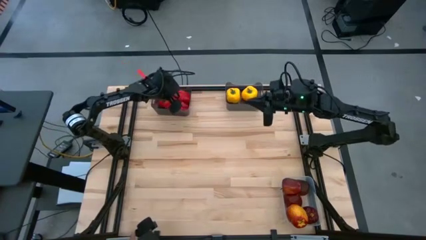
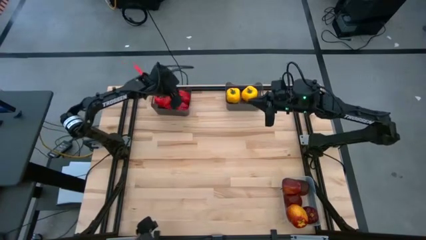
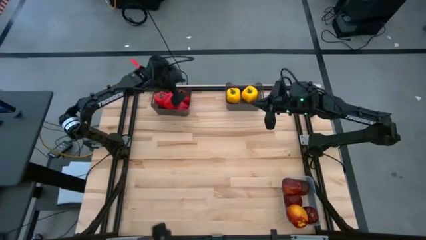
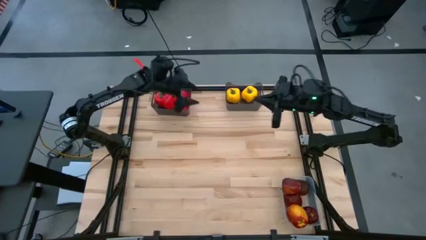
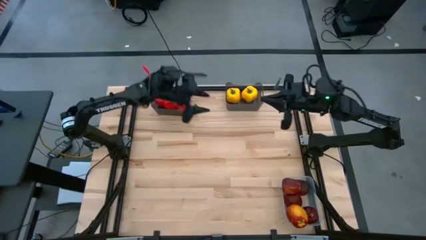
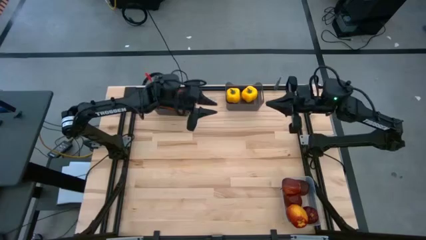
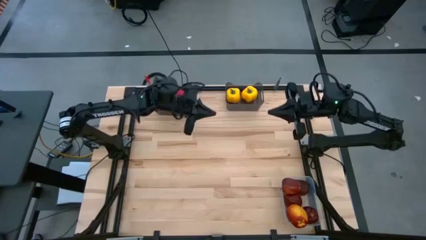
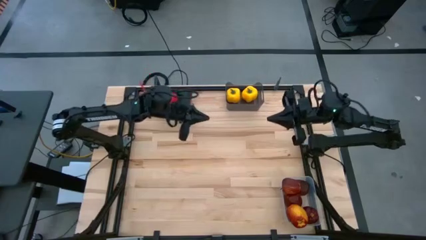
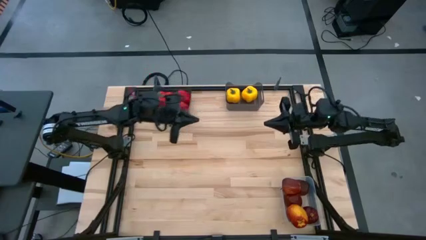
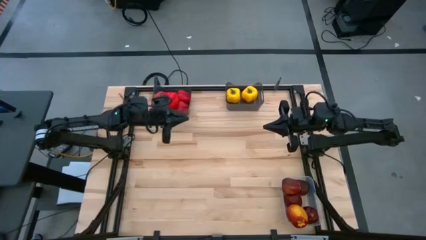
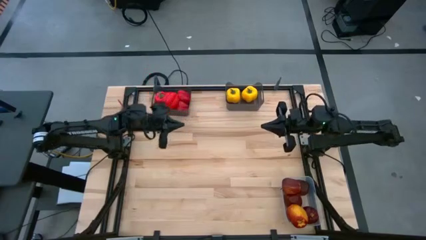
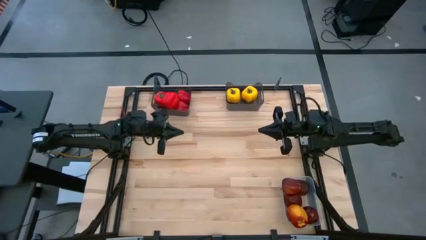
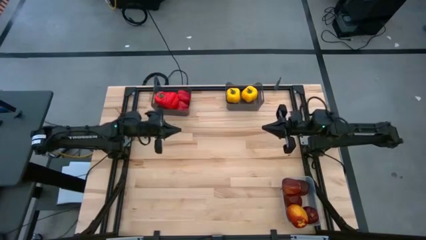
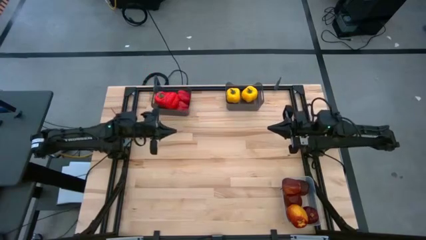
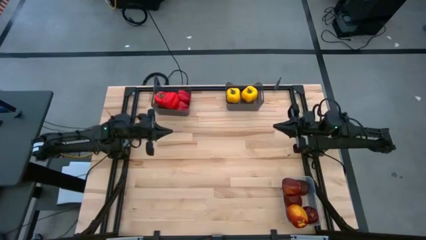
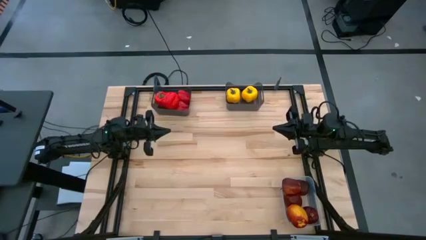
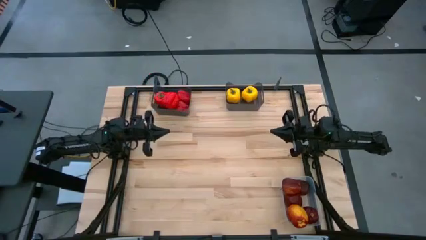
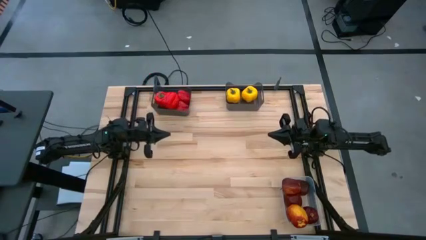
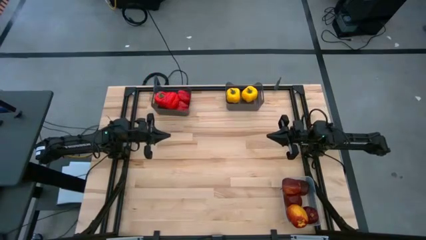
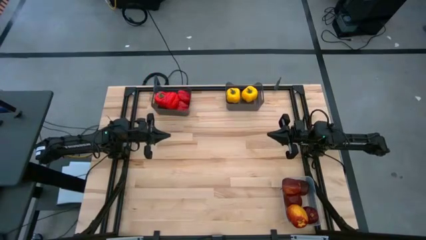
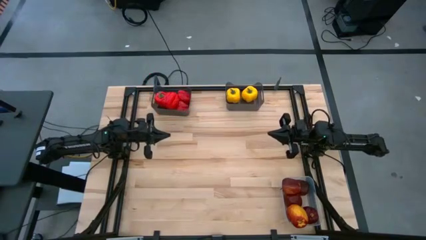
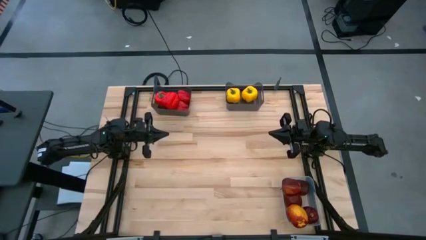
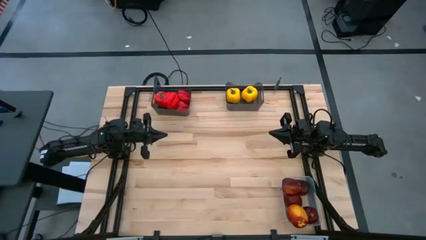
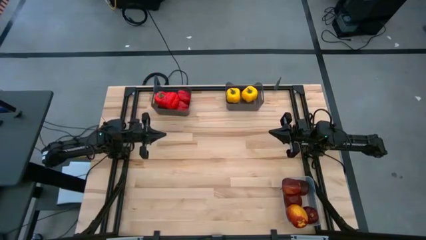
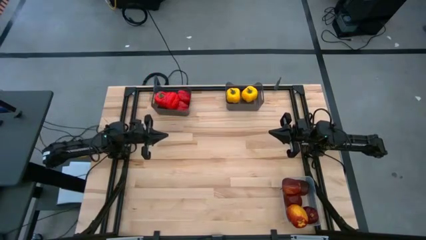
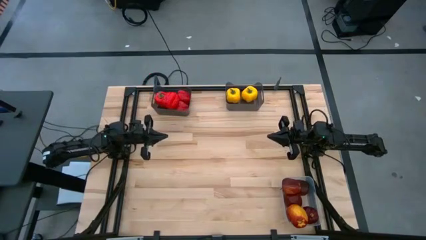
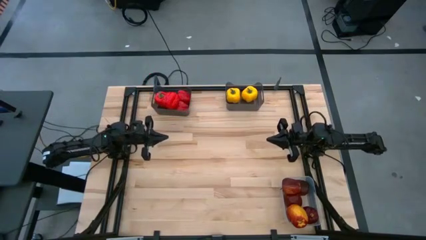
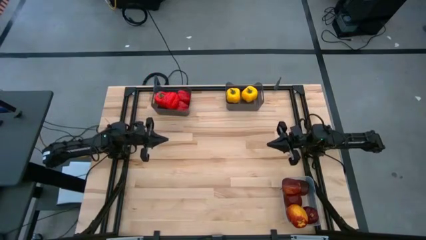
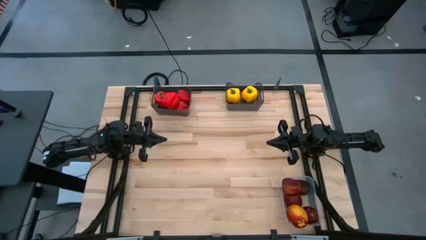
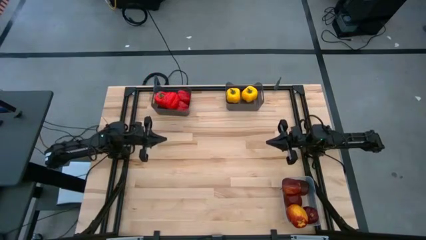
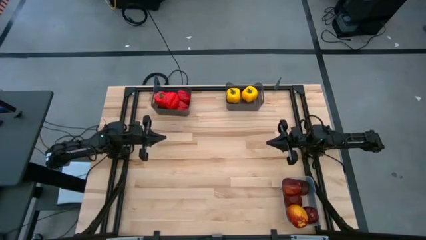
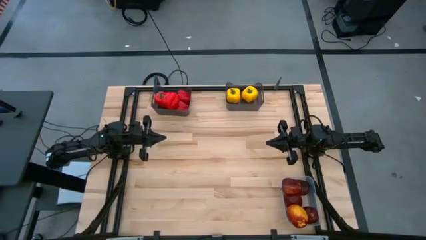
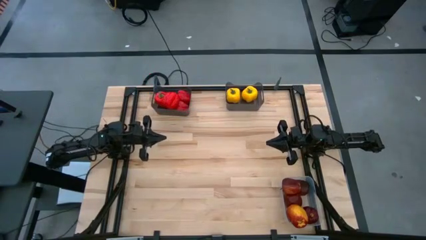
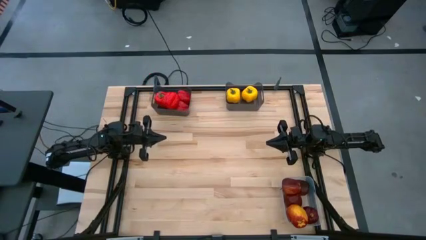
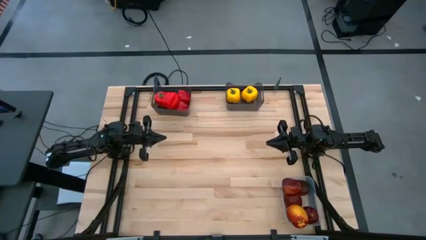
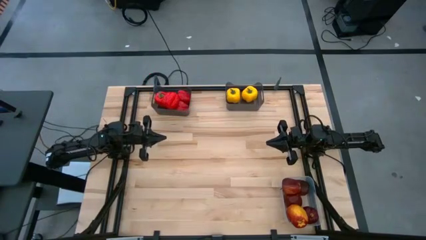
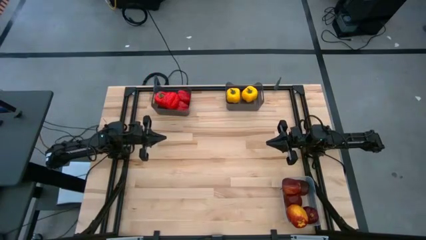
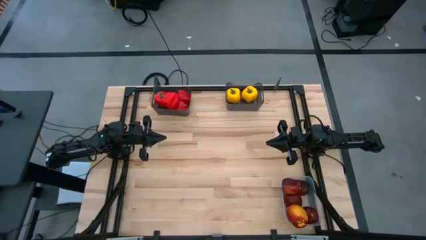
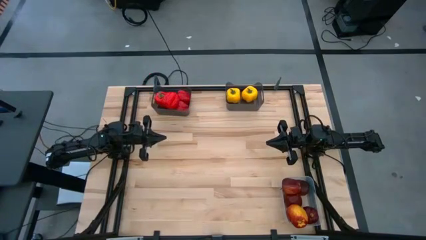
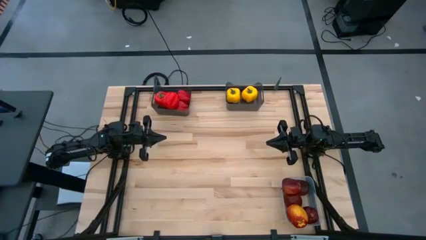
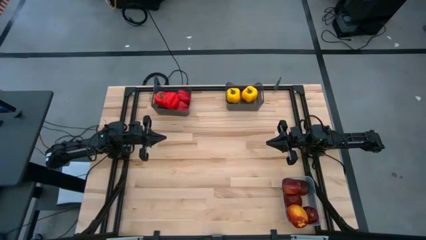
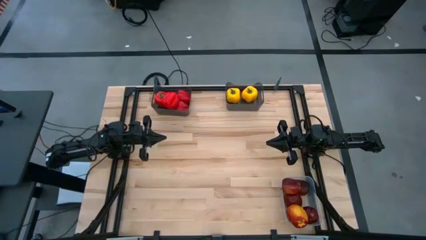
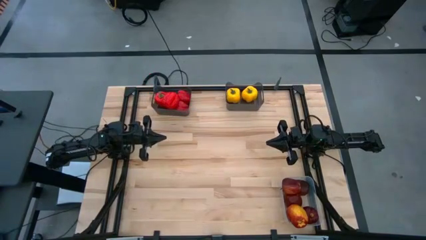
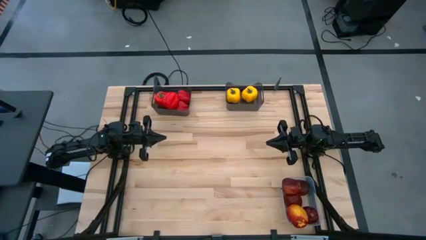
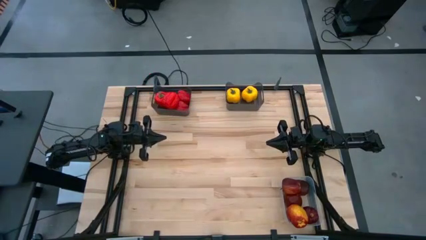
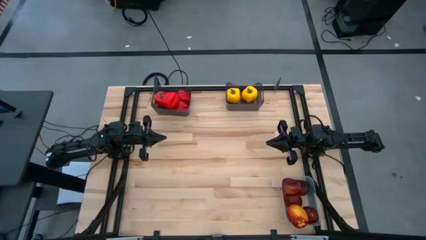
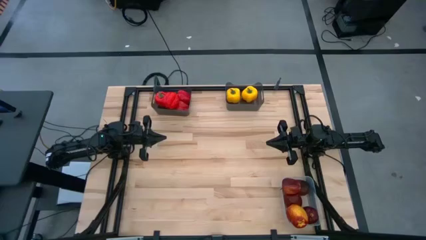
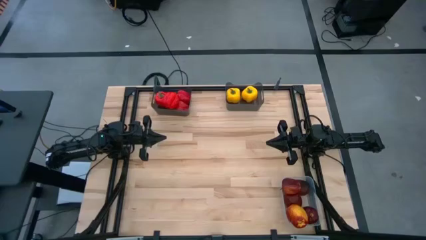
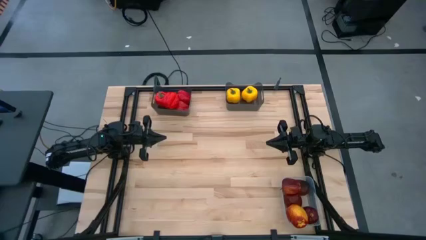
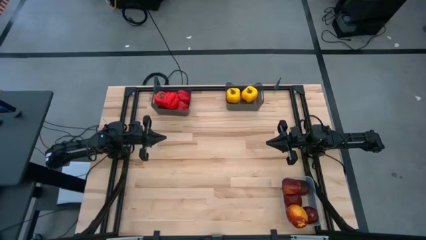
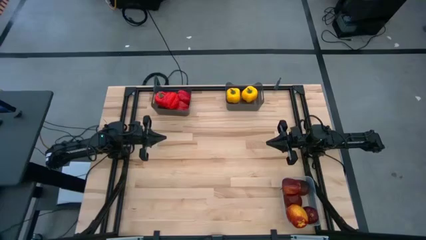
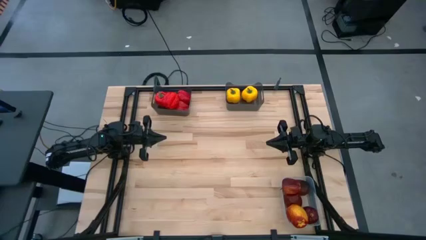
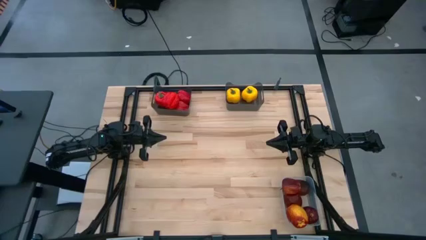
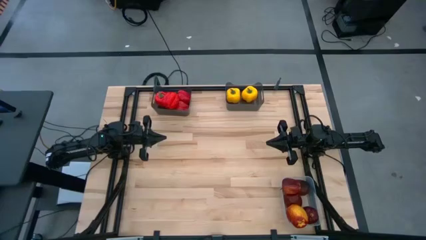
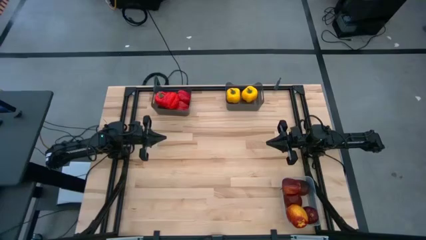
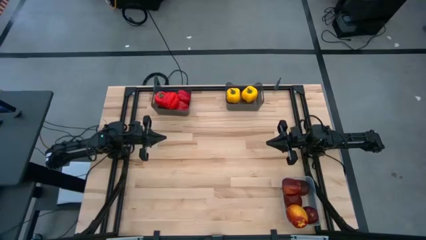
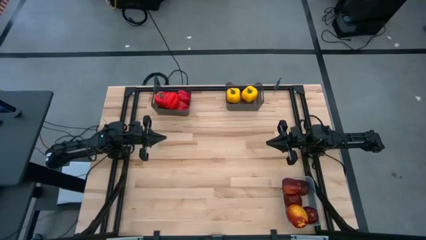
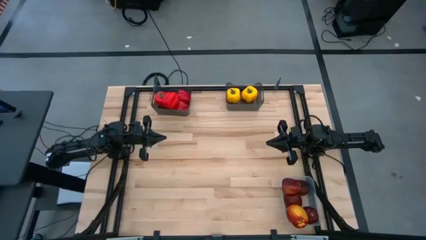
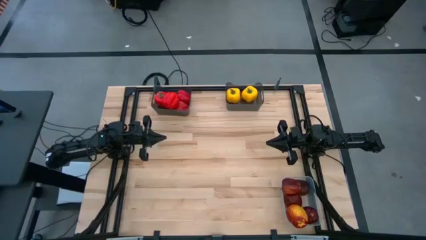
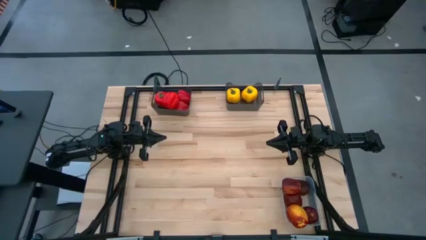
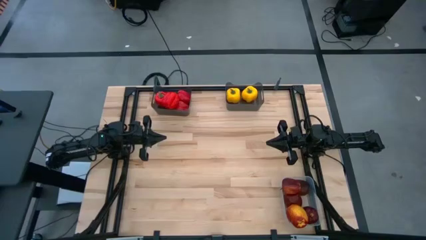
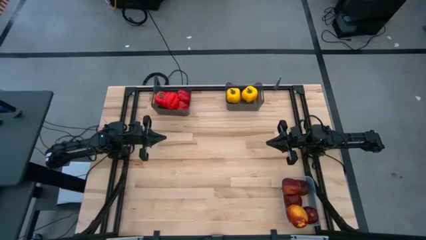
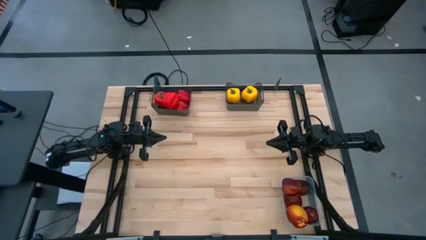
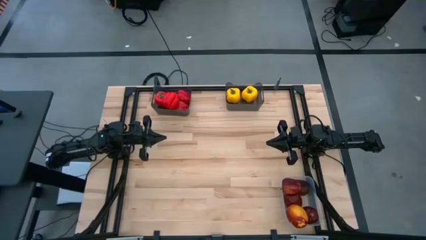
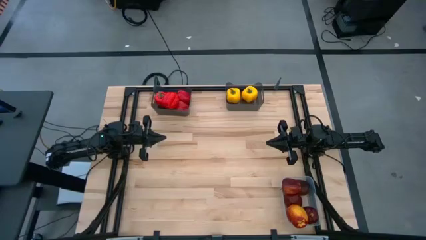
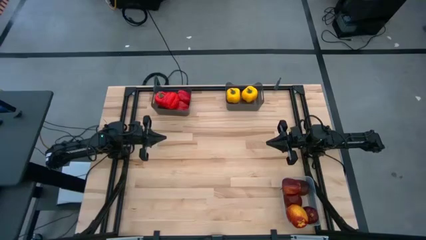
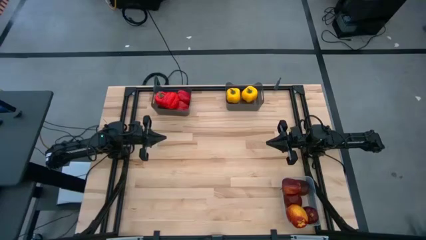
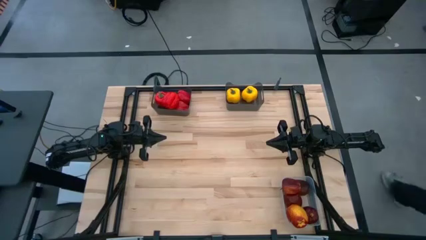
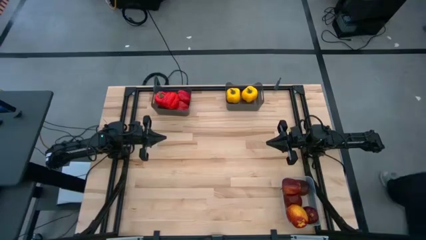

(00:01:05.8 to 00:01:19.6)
Task: Sort produce into baskets
Return to Home Position

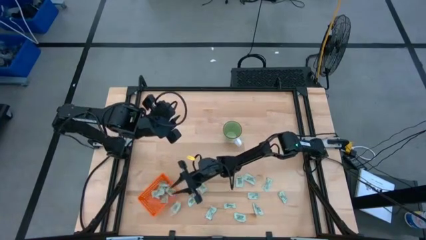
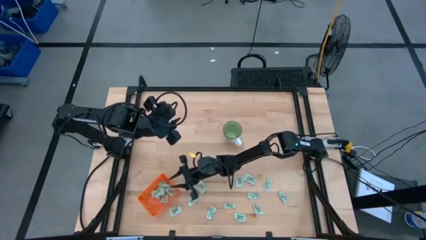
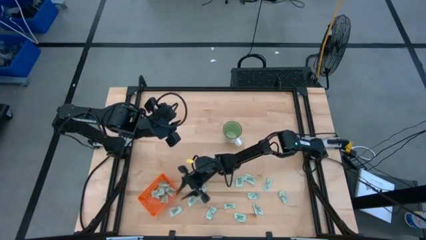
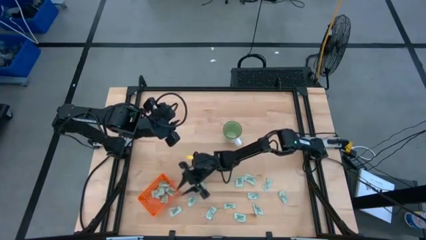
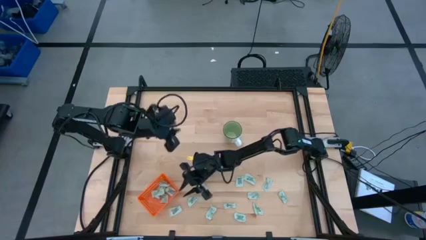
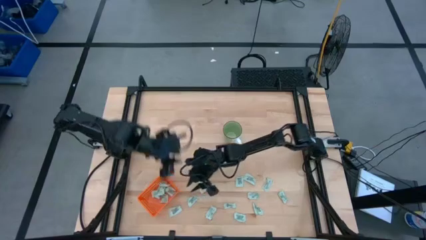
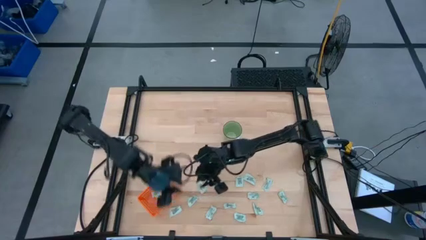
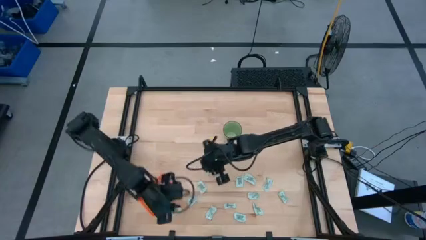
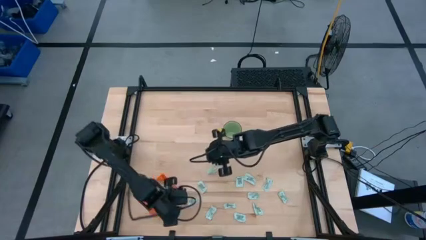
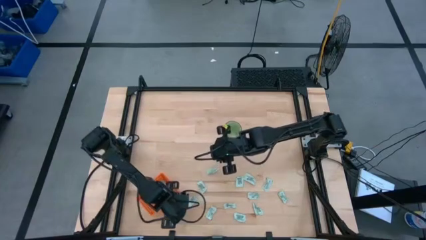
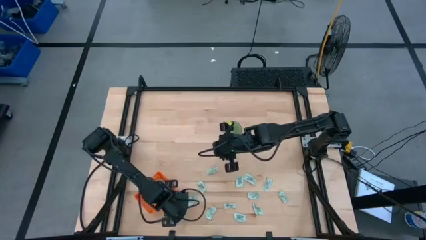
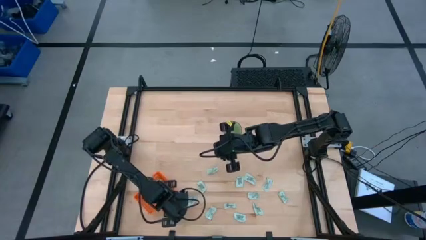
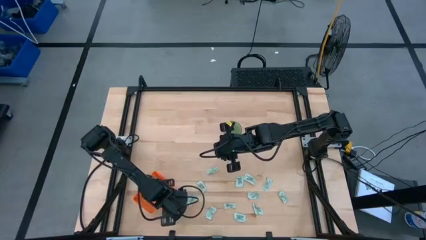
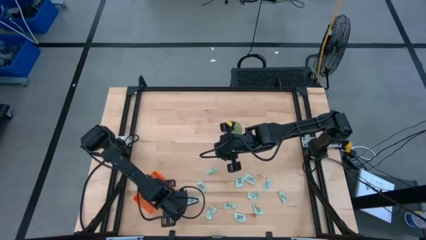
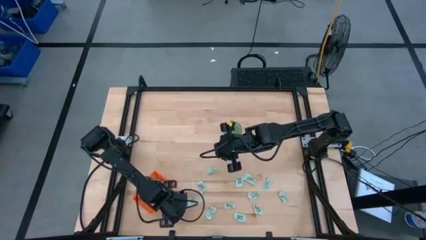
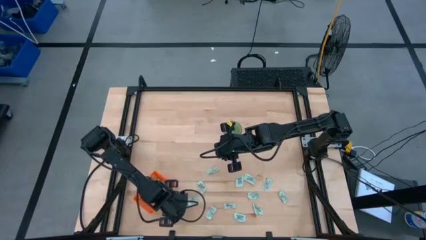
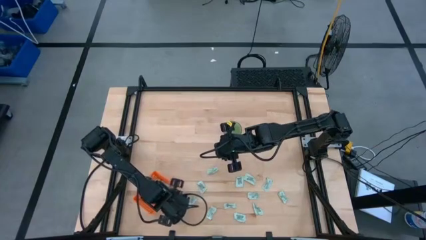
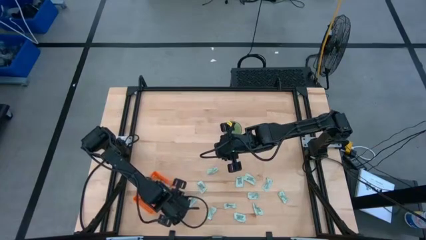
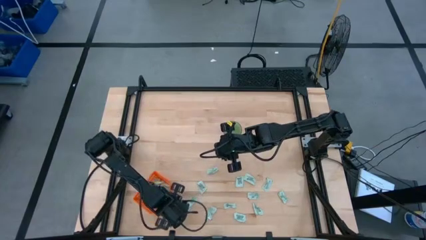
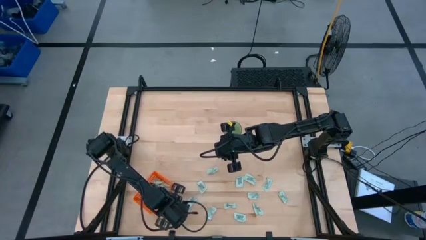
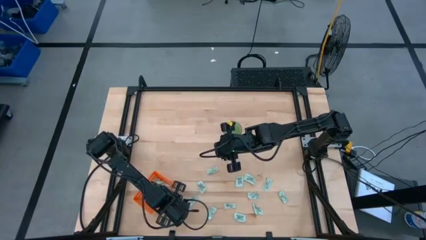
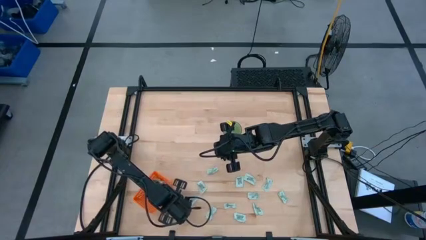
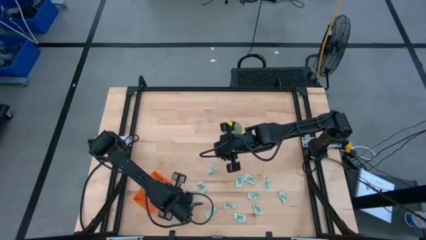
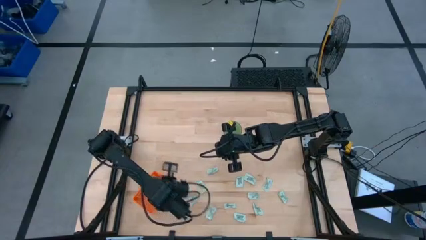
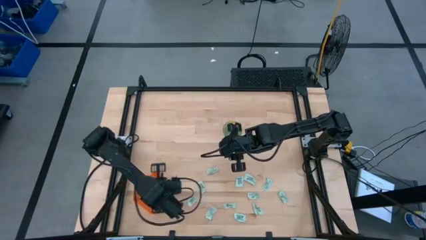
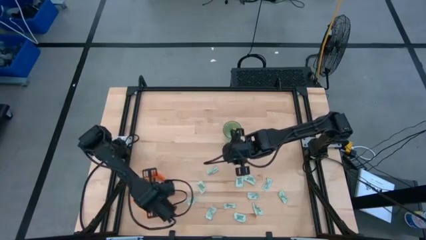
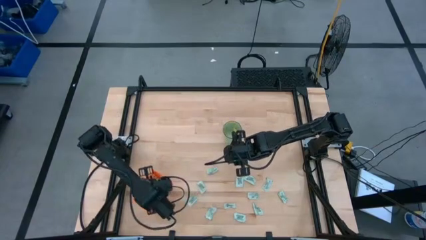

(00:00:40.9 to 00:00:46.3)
Task: Pick and place Stevia / Truvia into bins
Put the light green stevia packet into the orange basket
